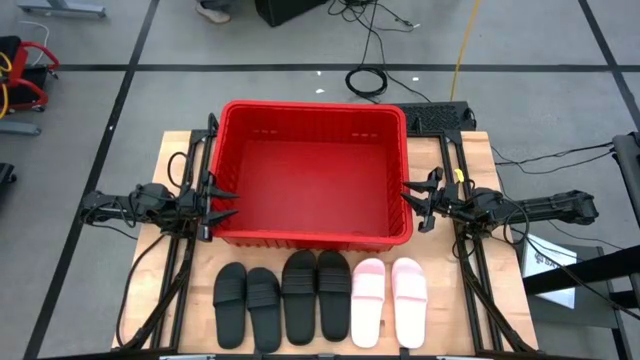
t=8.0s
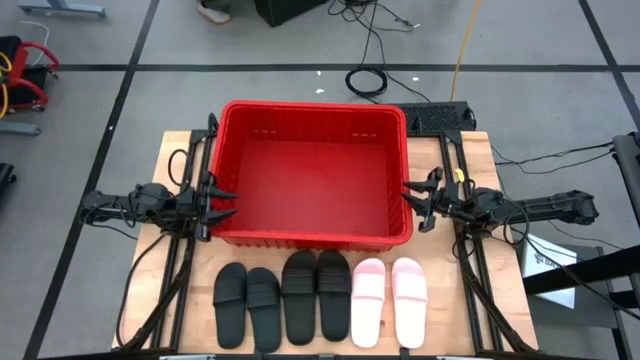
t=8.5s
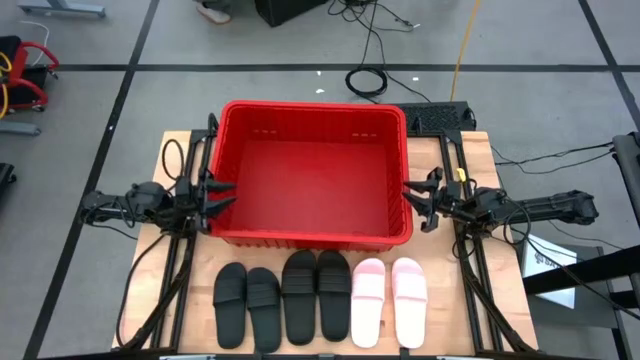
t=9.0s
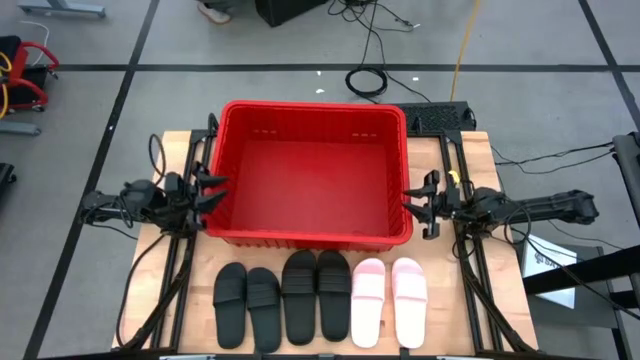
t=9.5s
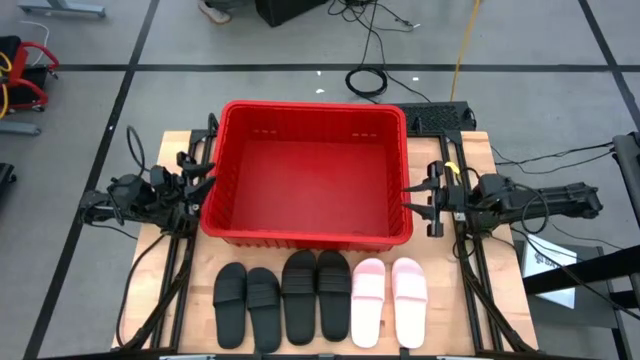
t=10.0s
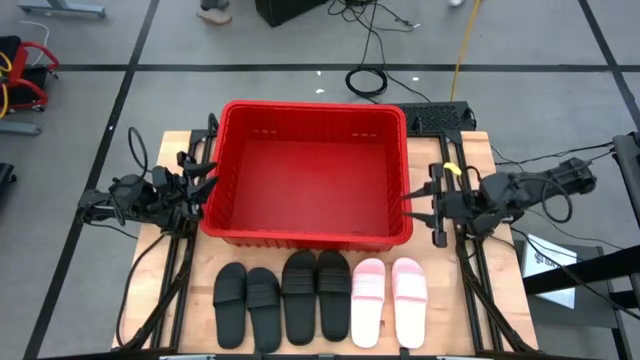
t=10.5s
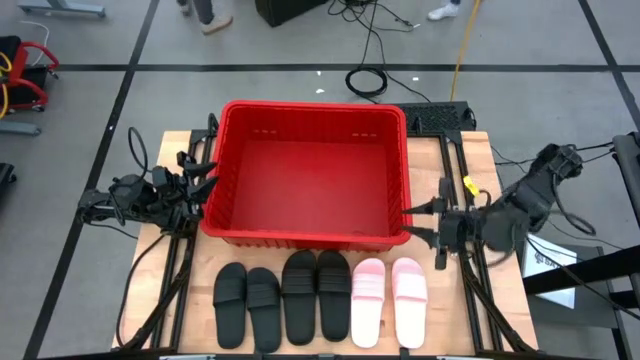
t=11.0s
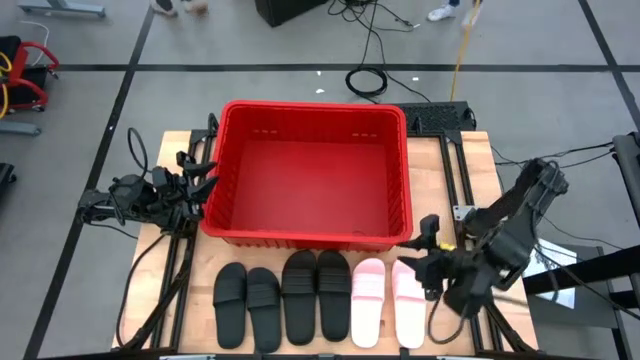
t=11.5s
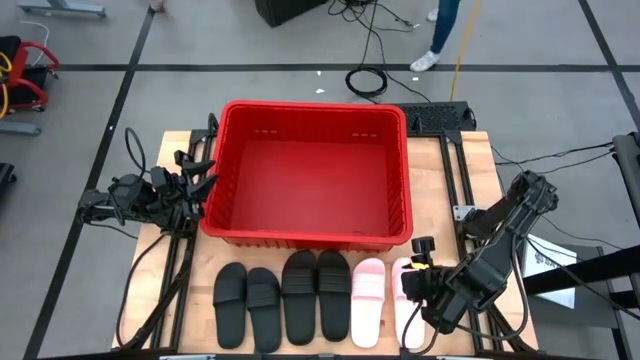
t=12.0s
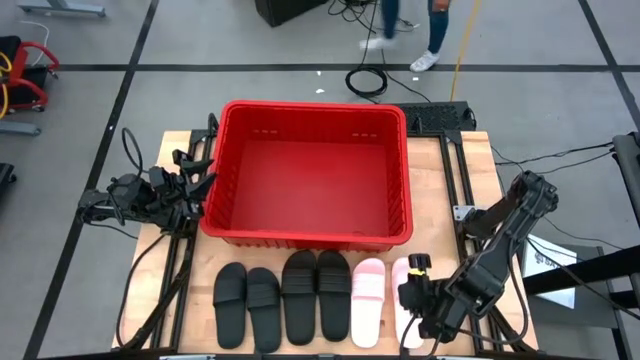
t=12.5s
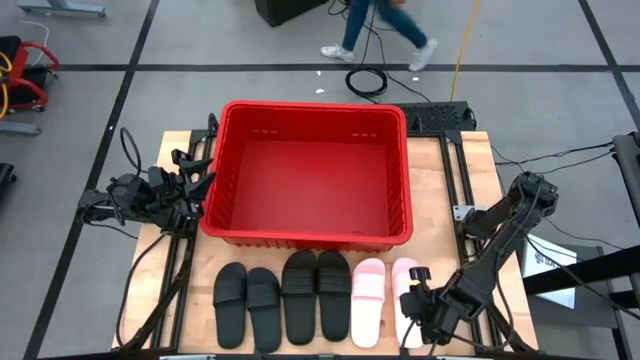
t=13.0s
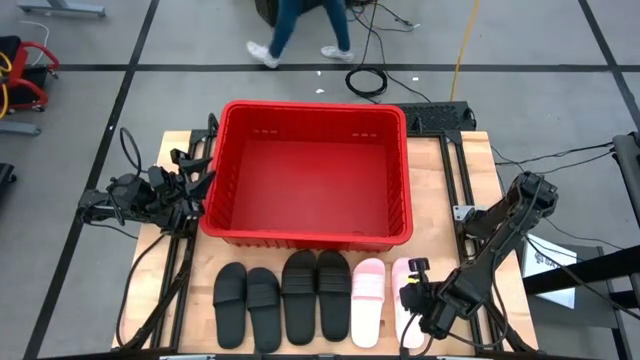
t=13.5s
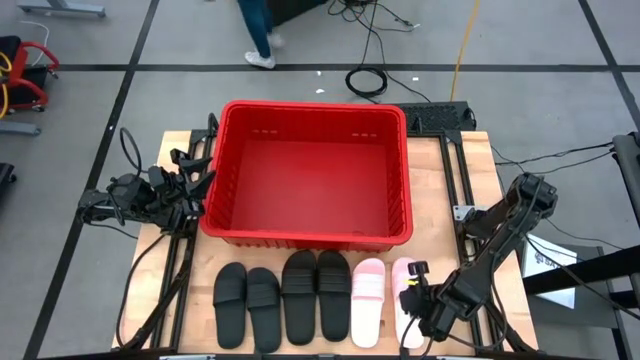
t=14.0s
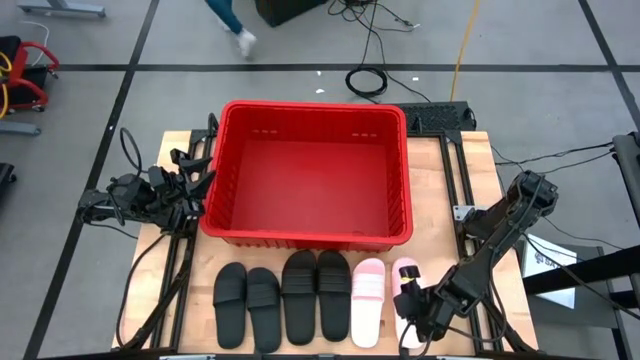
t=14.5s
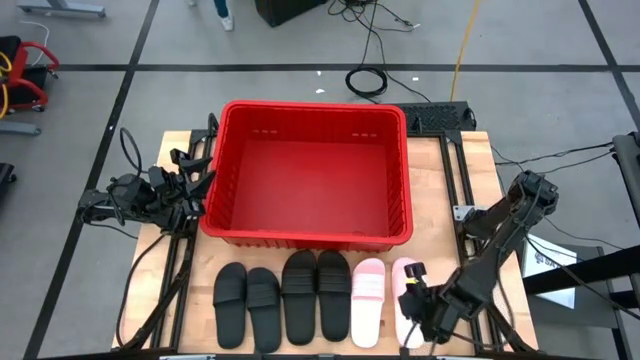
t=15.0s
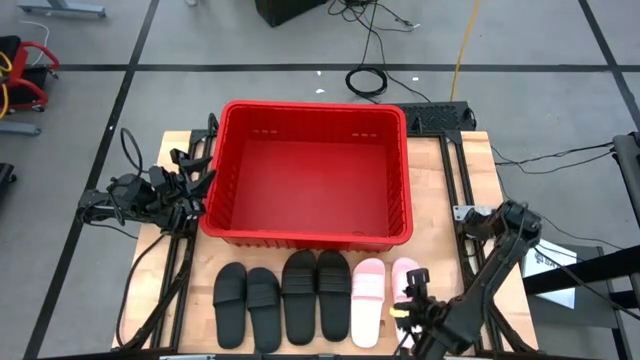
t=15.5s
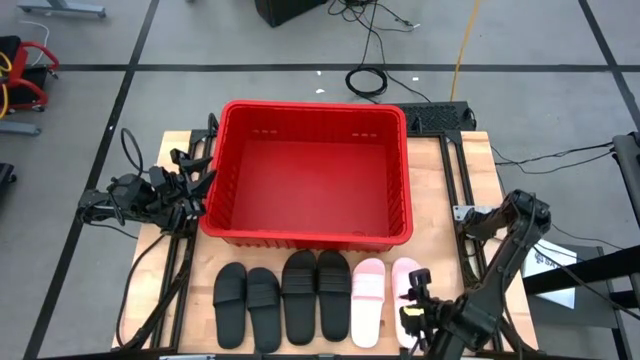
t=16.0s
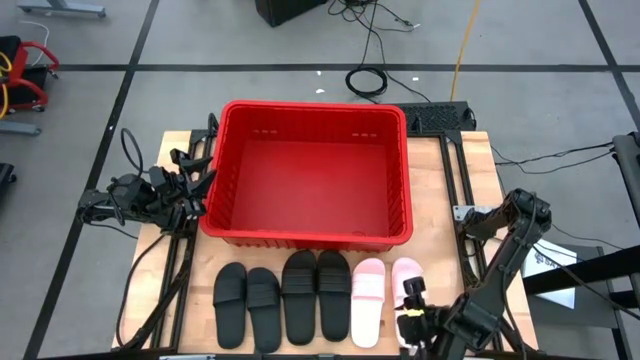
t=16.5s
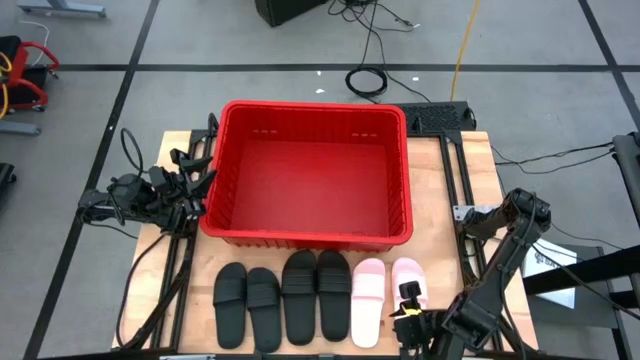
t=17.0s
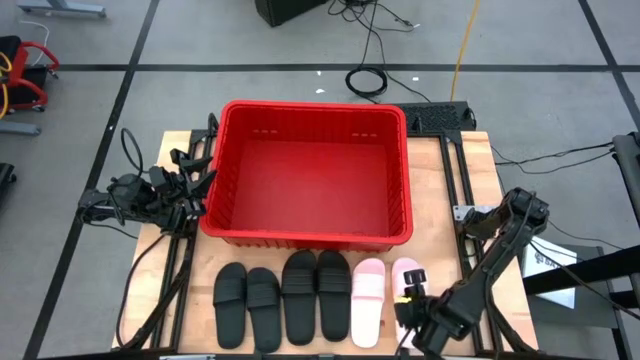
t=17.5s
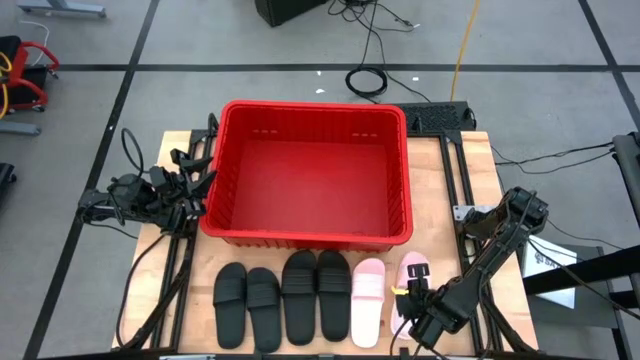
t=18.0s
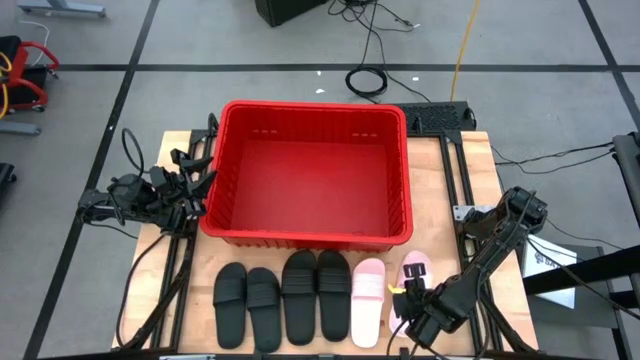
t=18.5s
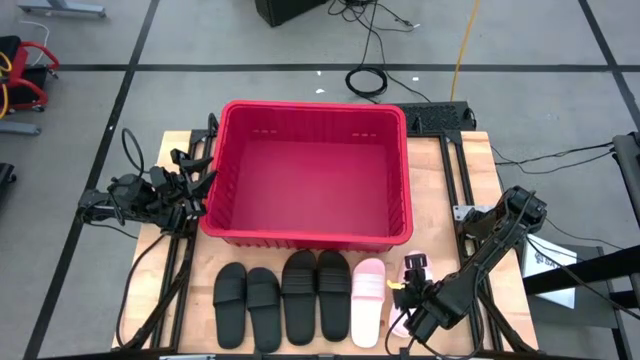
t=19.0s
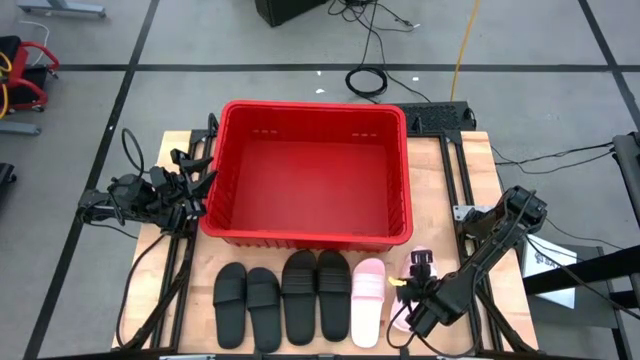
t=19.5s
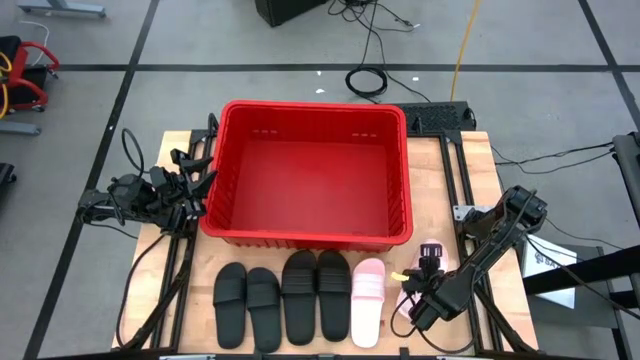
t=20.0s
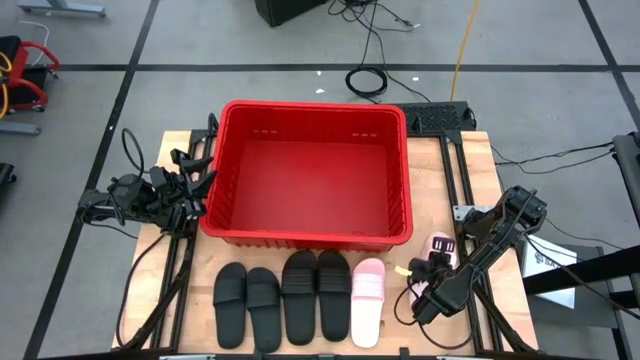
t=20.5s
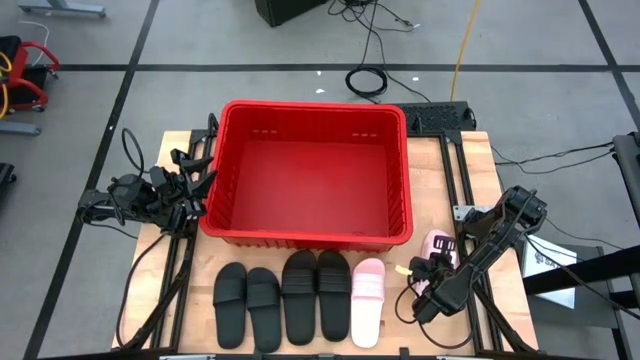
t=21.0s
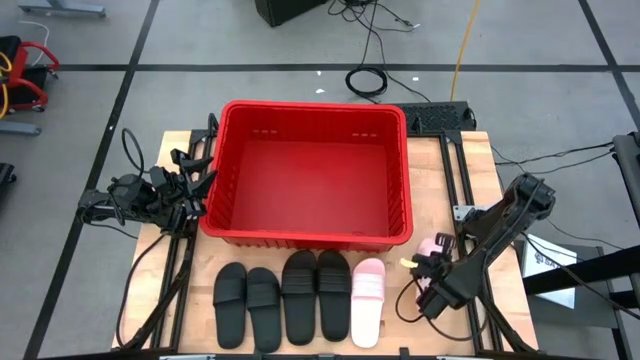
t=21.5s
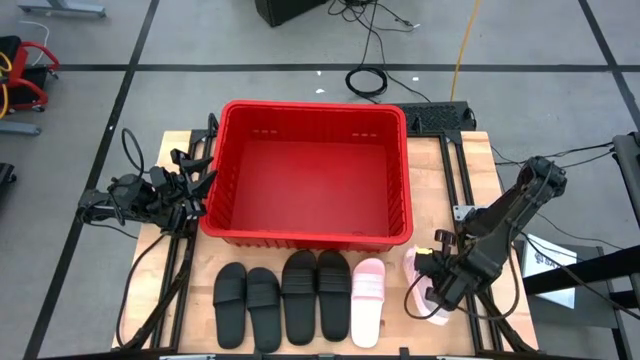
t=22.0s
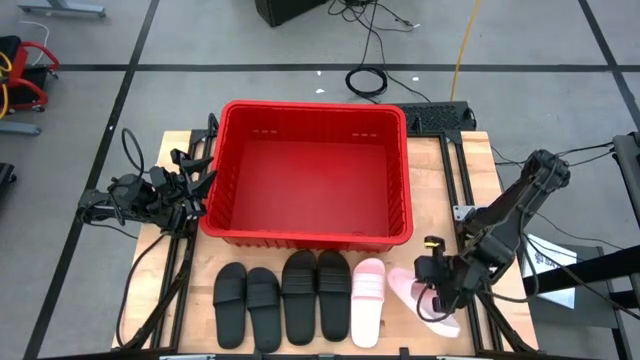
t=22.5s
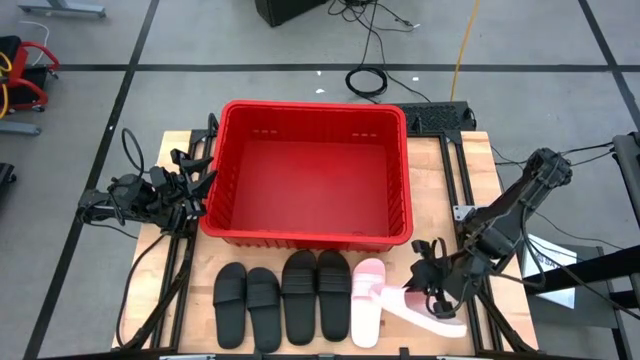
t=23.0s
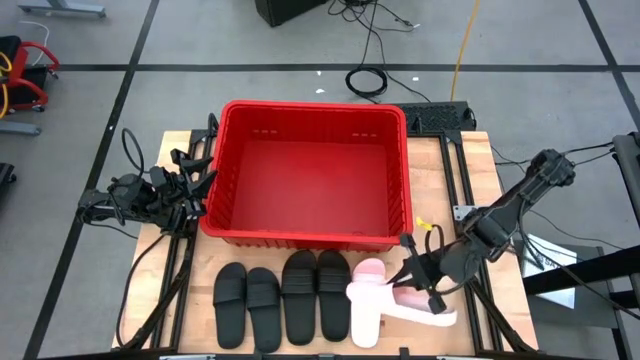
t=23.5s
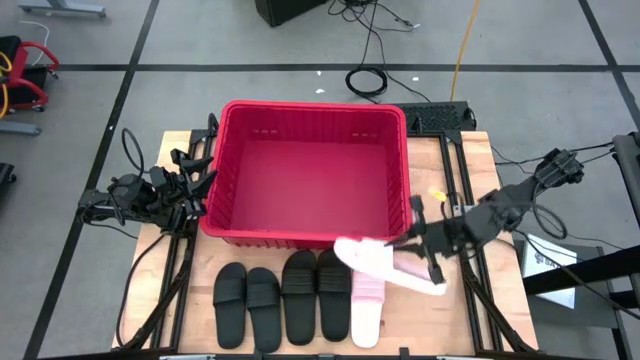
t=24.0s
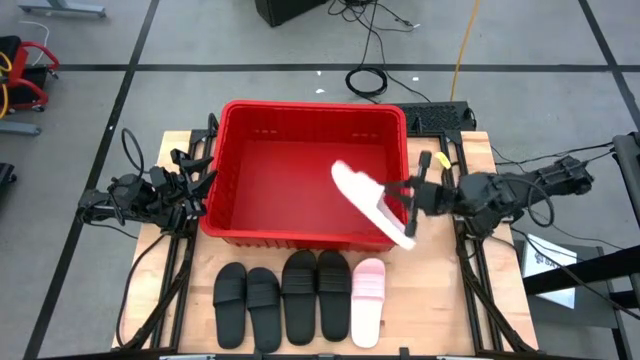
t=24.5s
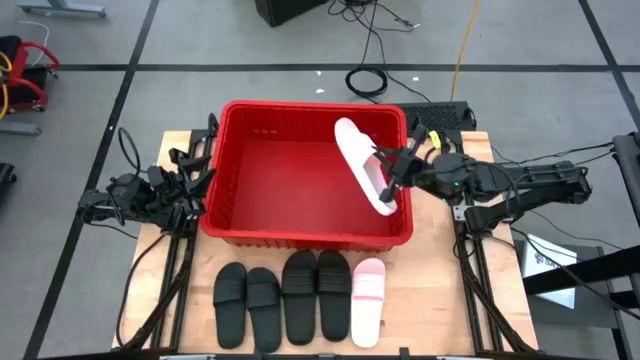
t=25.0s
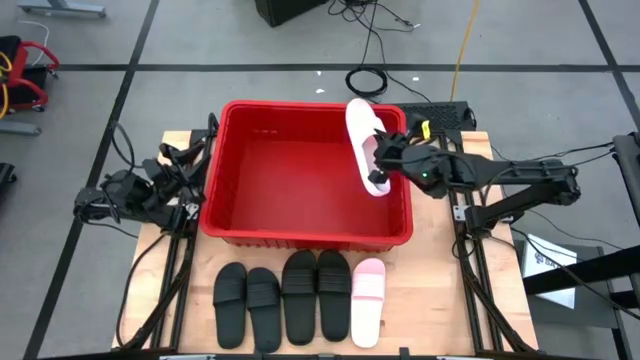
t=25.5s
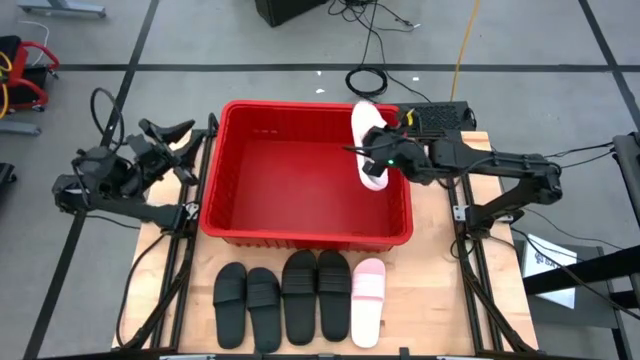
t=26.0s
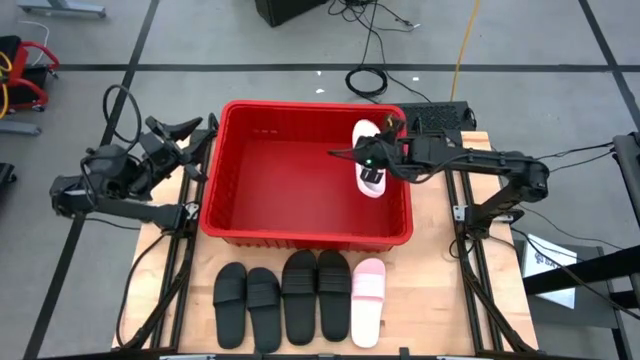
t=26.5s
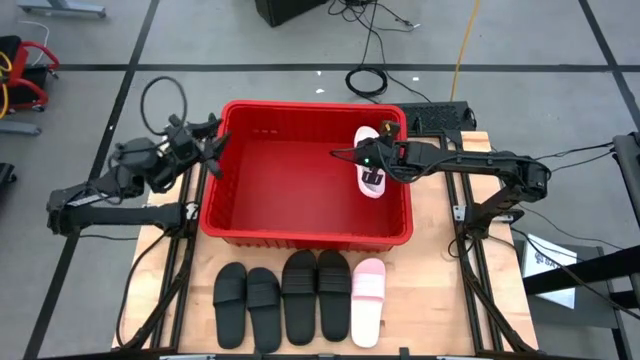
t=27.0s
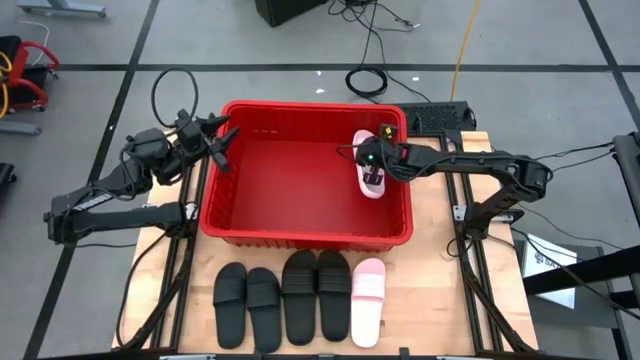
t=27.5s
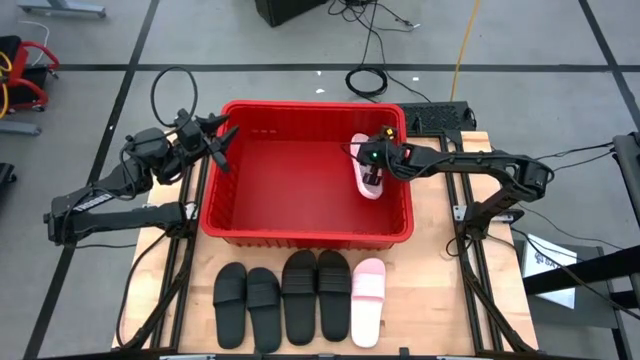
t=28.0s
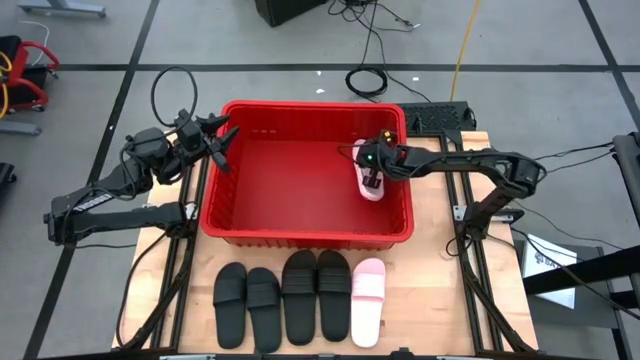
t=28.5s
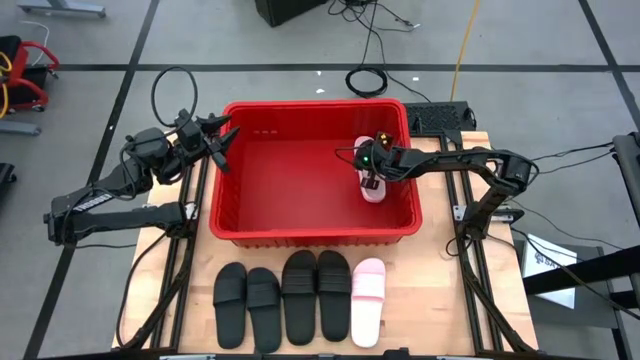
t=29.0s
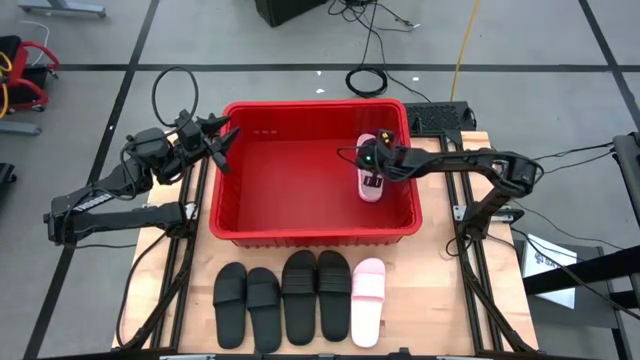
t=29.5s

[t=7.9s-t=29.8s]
Task: Pick and place slides into bin
Put the pink slipper into the red bin
